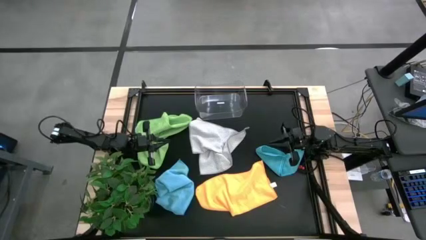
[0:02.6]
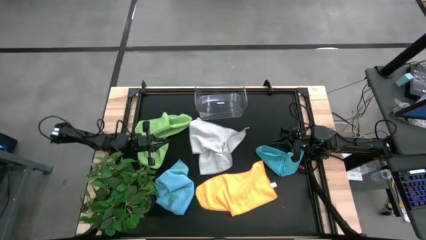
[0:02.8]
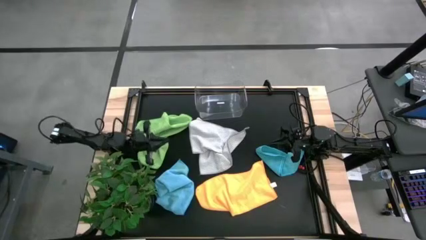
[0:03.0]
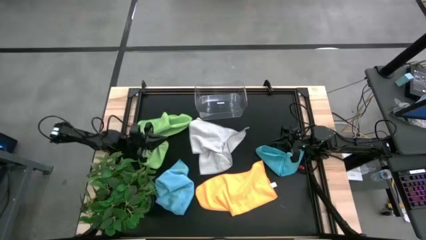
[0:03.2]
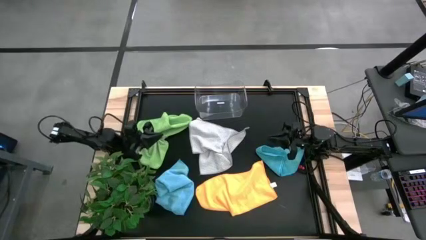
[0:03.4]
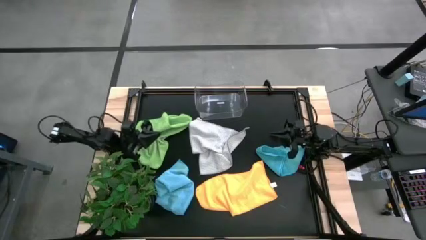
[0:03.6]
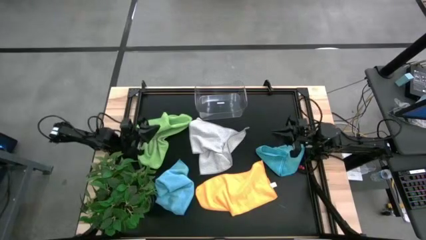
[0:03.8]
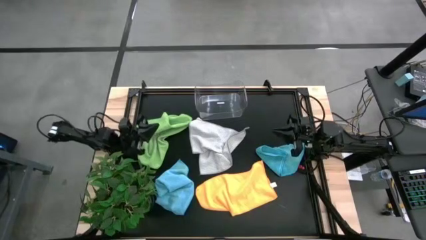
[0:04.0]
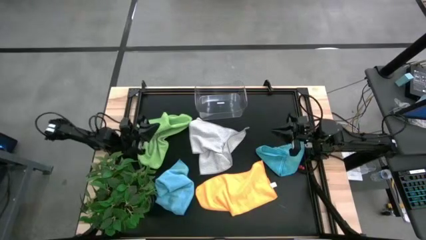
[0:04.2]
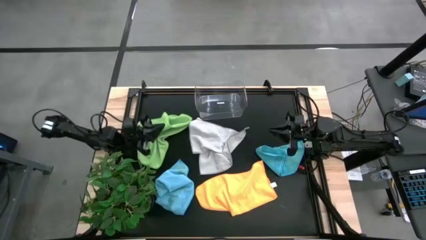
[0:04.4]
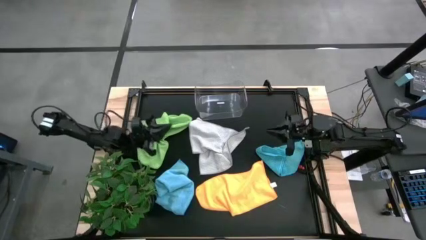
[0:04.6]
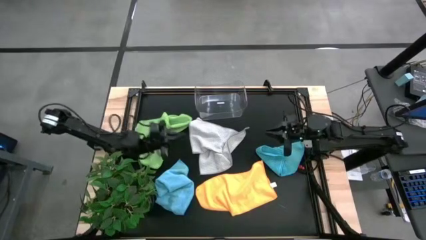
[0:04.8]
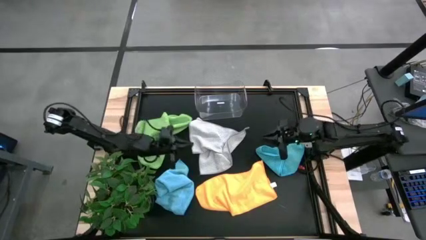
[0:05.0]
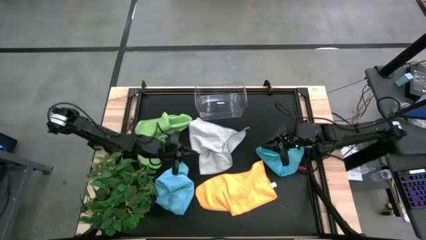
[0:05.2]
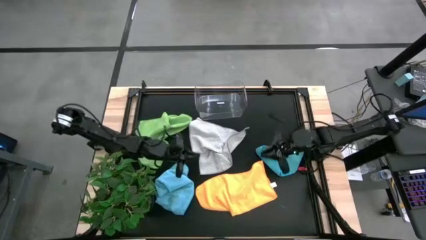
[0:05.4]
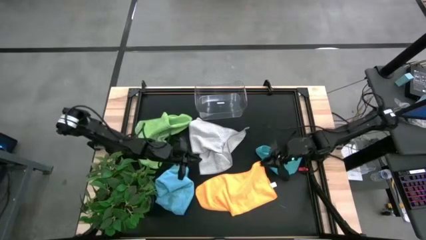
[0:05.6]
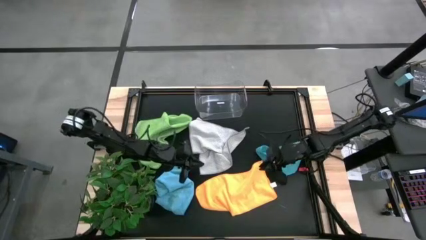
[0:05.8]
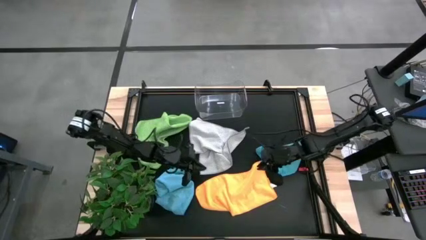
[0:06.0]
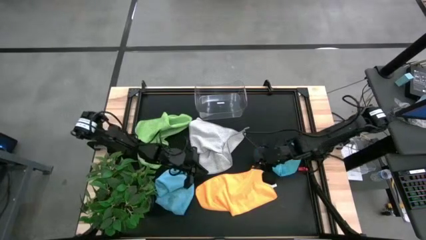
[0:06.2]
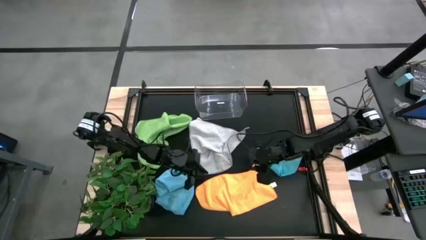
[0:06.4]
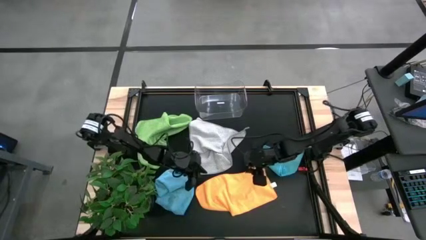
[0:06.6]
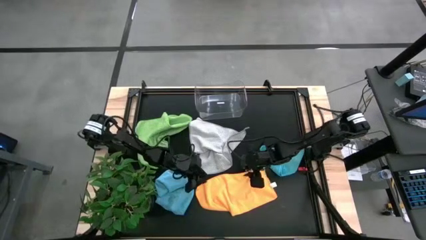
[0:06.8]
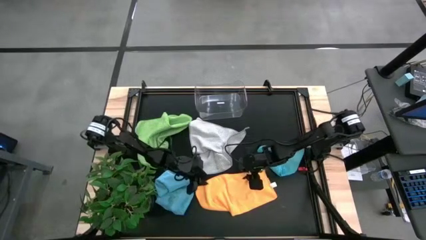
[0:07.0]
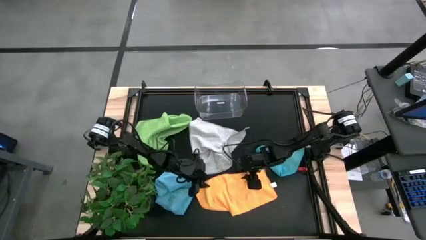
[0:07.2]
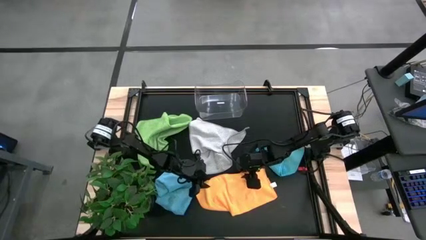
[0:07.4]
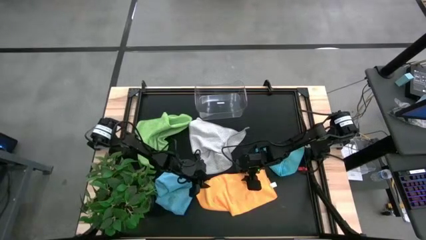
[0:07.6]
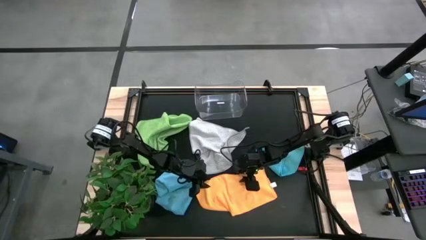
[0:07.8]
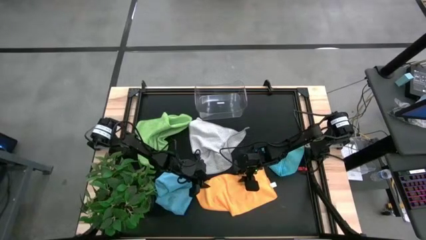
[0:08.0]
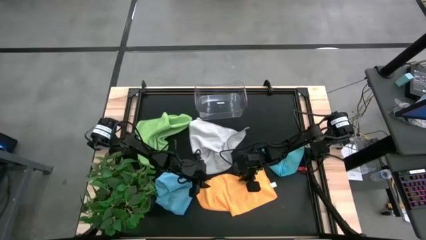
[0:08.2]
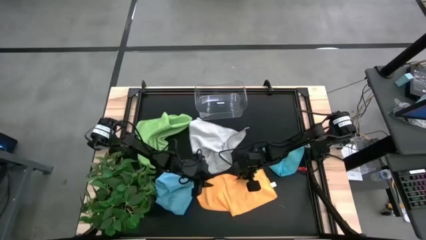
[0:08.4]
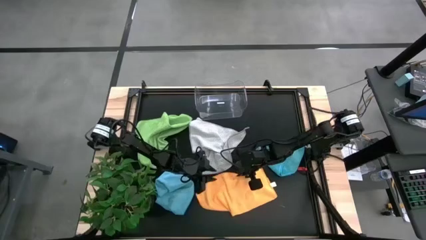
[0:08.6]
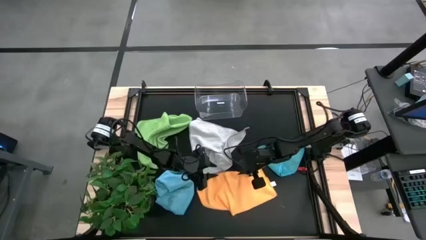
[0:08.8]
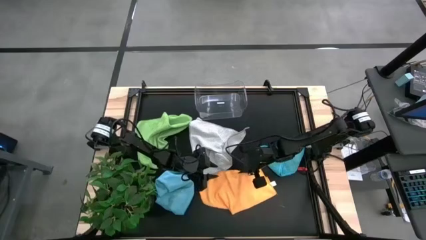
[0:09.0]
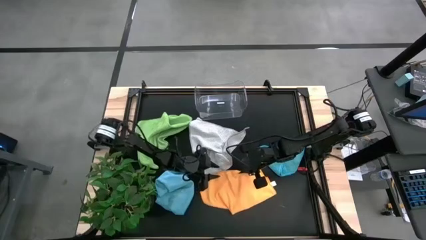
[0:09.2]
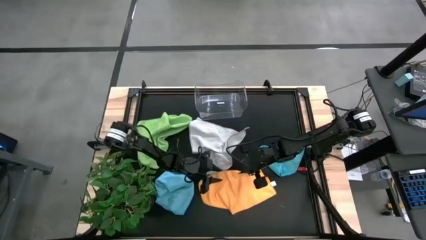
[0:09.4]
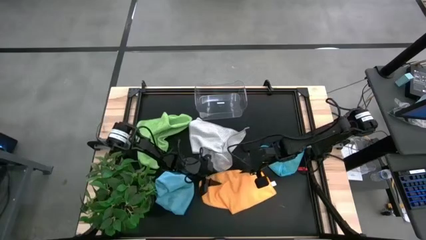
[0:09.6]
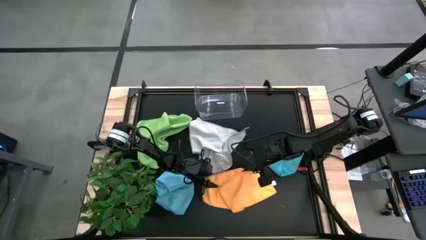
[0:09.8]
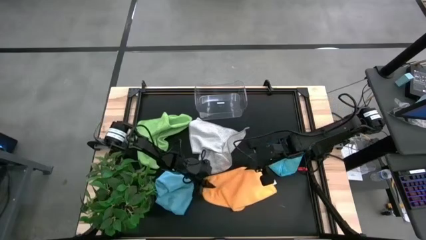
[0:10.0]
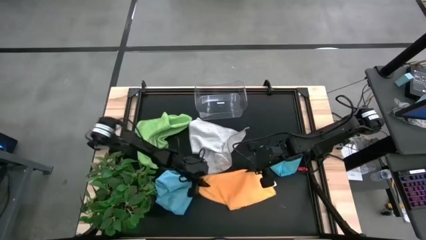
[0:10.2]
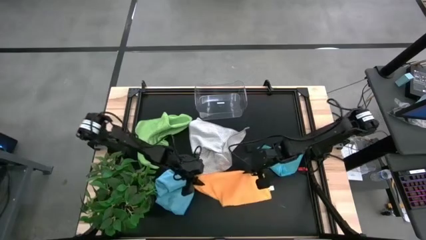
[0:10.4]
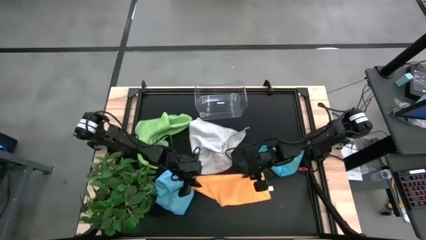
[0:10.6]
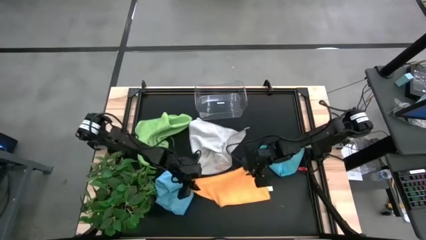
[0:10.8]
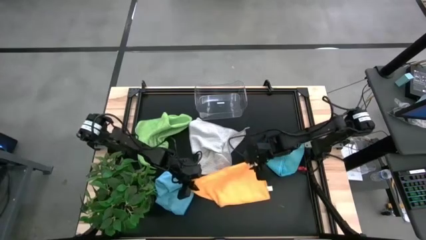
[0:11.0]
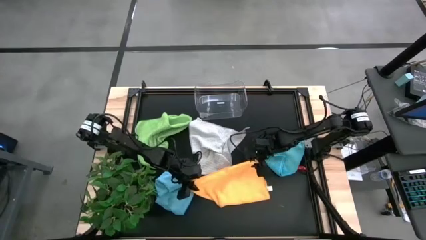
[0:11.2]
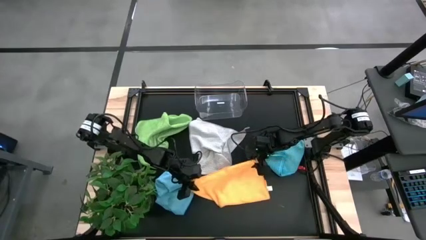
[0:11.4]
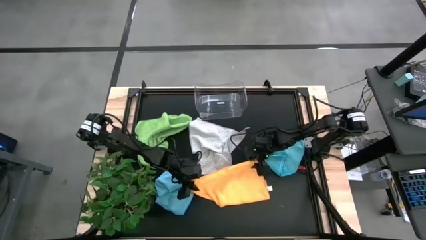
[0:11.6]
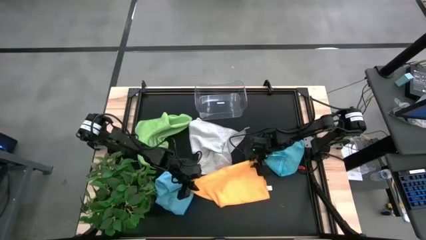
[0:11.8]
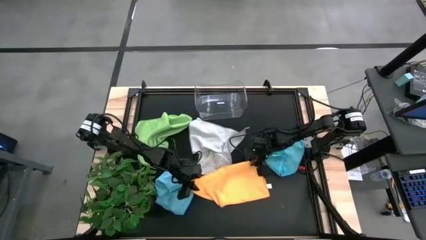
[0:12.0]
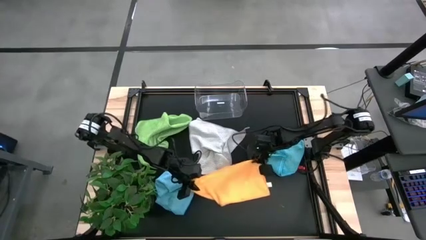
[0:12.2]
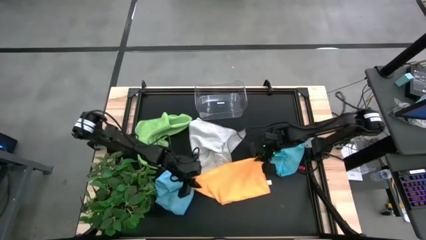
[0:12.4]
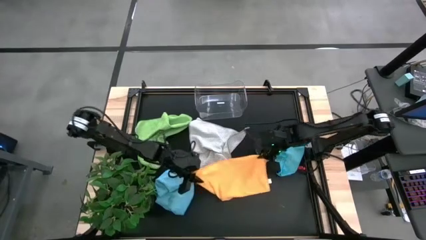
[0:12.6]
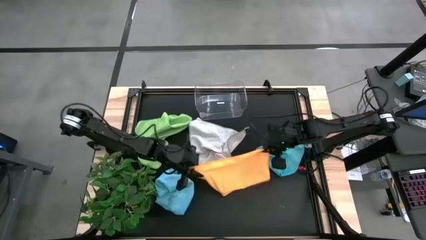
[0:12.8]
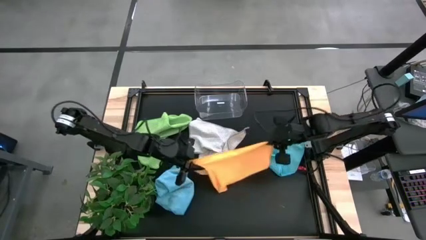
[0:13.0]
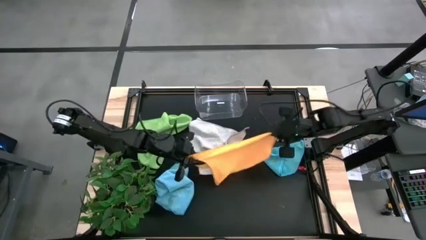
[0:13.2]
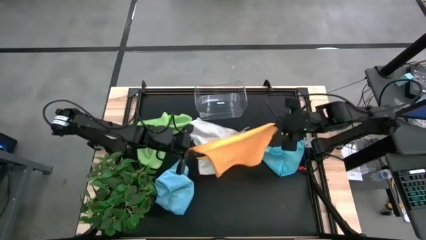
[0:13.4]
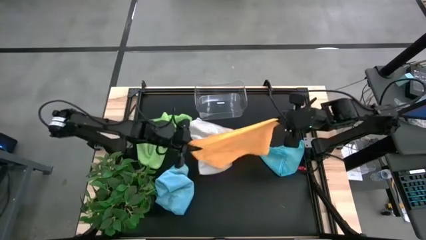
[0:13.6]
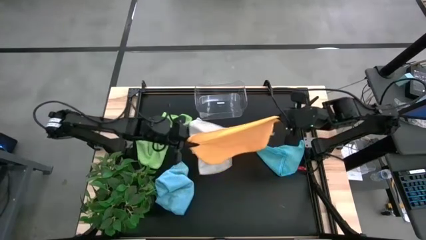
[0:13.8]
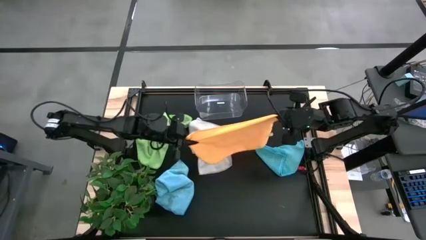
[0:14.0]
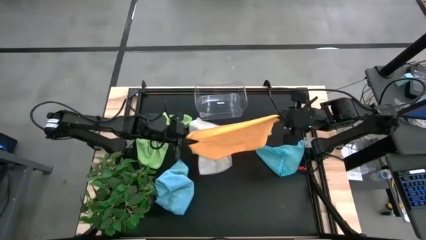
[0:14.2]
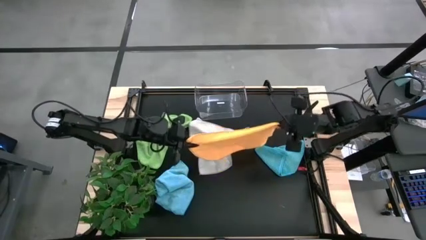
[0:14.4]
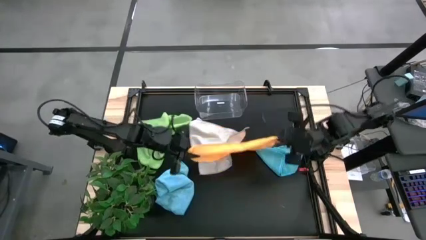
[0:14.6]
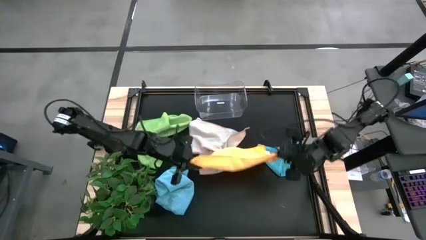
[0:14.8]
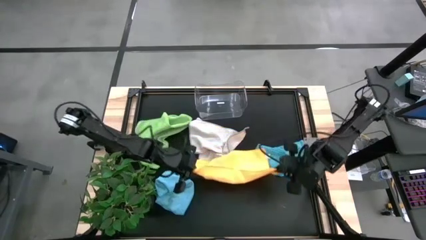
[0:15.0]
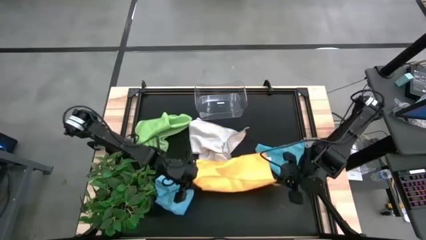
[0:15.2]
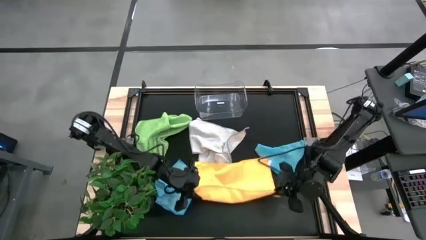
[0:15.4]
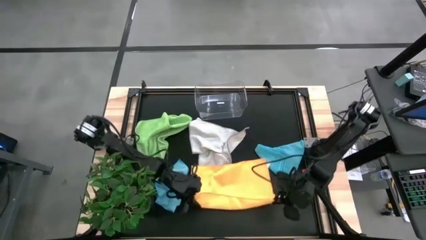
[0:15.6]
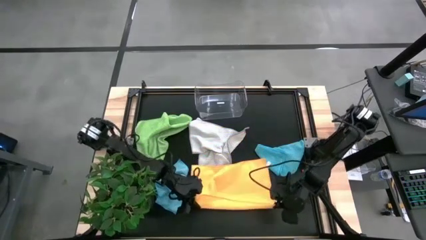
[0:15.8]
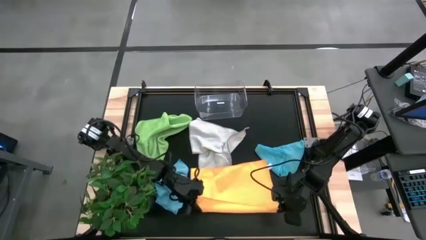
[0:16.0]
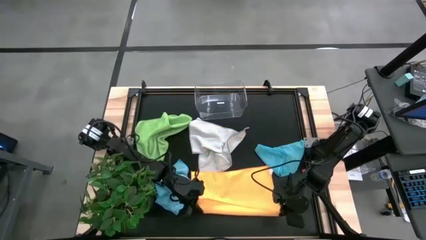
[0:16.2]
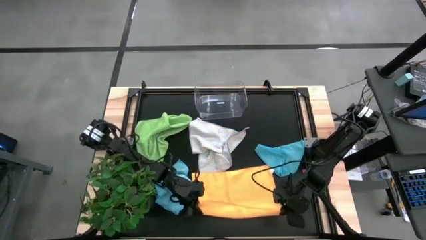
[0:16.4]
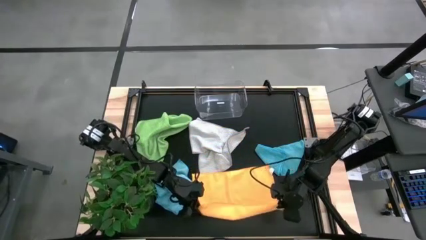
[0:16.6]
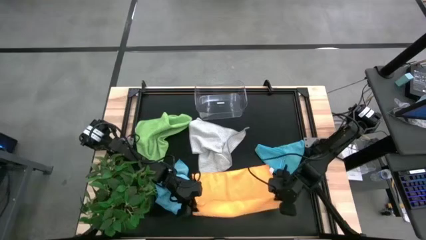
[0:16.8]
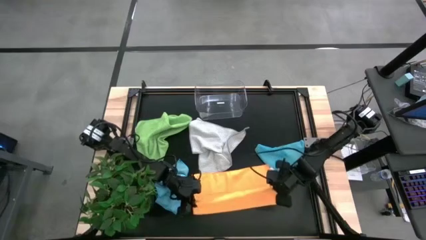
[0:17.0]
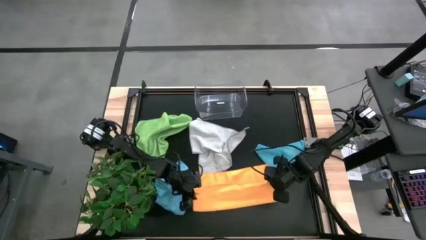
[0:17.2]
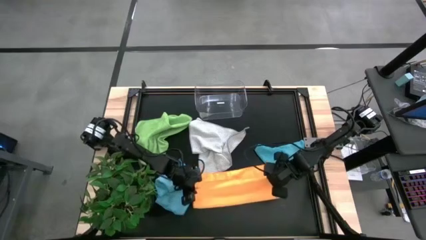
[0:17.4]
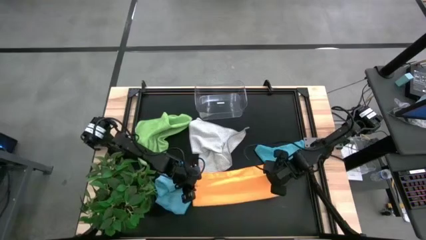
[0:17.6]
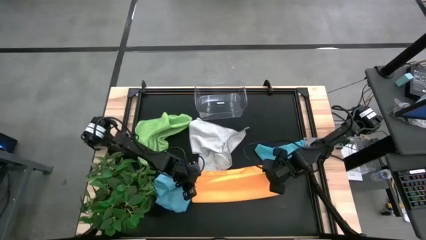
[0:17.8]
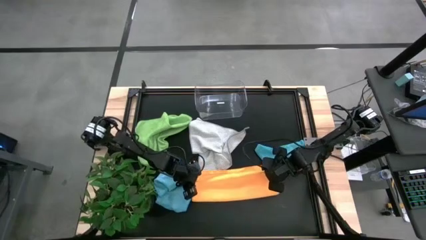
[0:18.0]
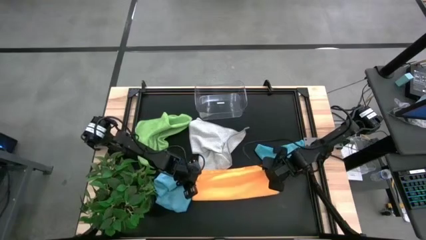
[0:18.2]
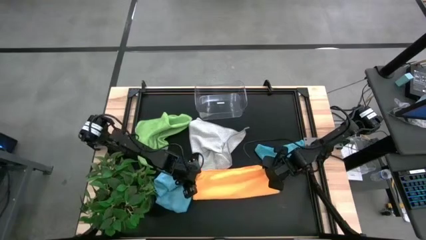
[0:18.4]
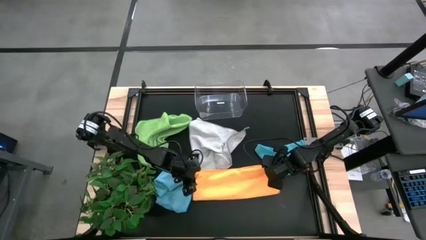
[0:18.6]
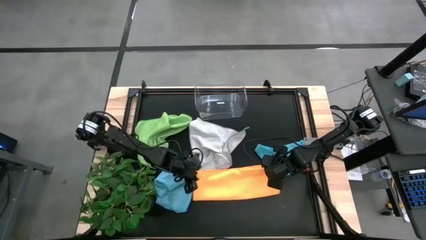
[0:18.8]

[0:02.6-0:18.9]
Task: Fold microfiber towels
Fold the orange microfiber cloth

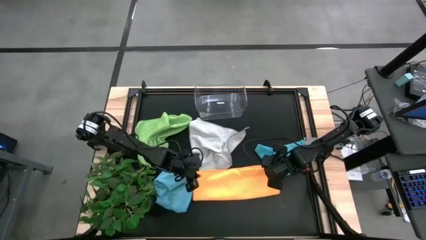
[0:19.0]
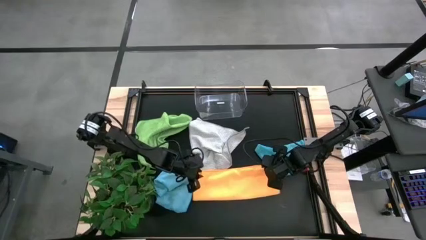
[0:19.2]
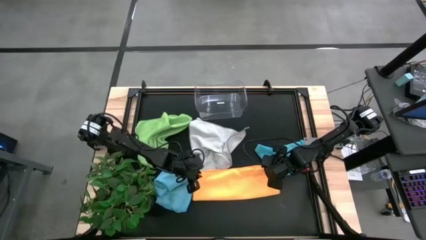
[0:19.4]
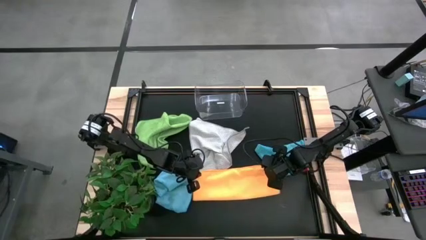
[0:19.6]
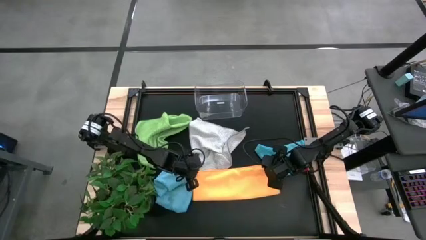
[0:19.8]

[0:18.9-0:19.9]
Fold the orange microfiber cloth
